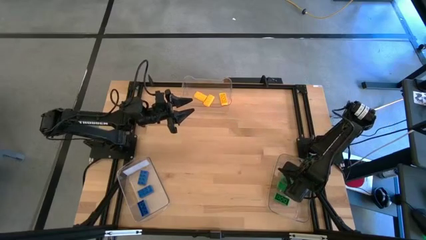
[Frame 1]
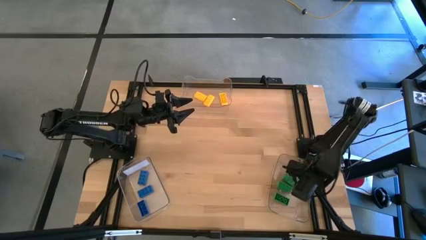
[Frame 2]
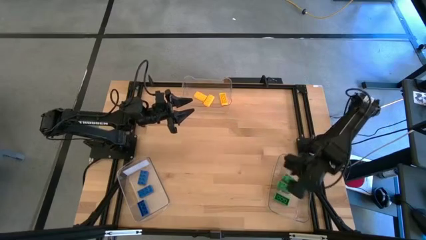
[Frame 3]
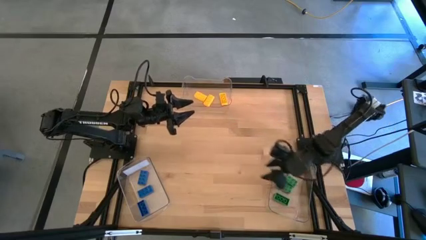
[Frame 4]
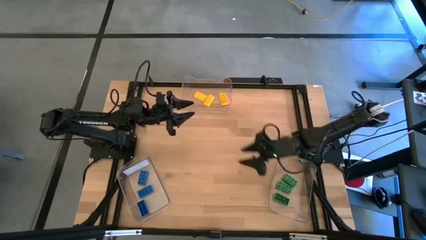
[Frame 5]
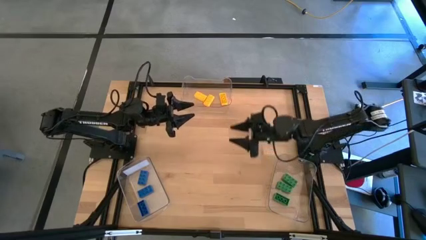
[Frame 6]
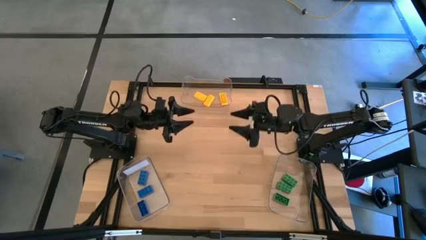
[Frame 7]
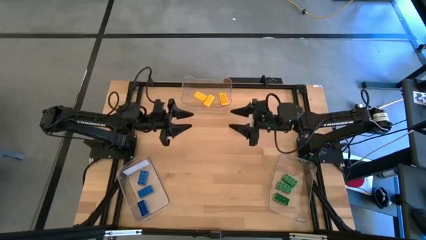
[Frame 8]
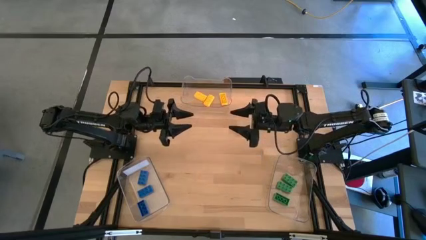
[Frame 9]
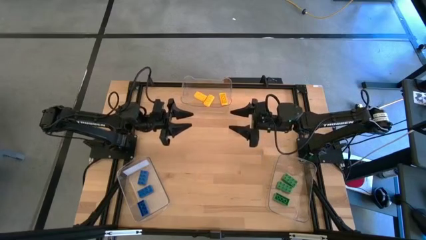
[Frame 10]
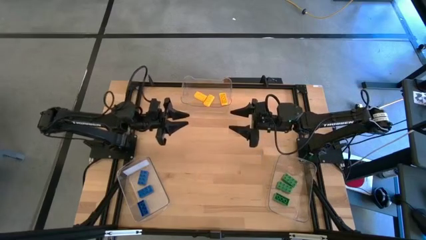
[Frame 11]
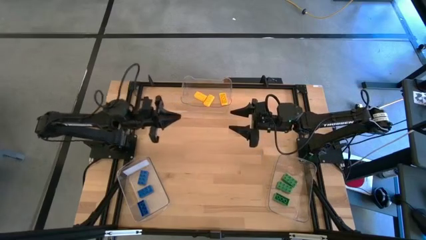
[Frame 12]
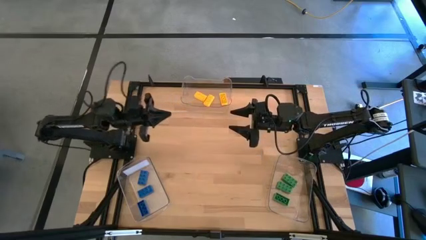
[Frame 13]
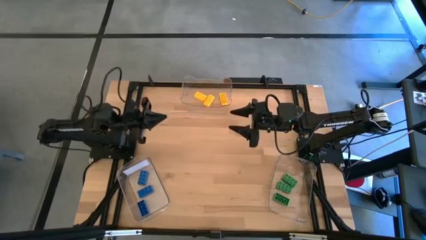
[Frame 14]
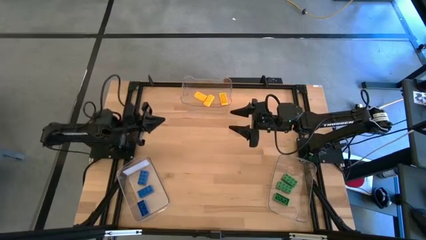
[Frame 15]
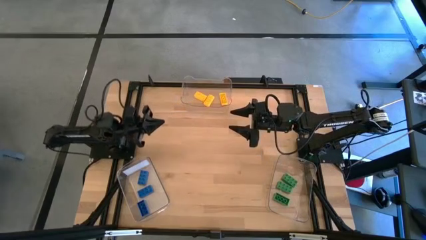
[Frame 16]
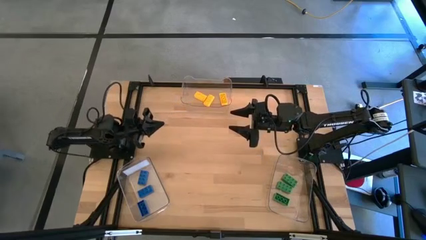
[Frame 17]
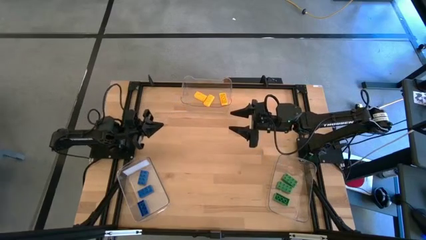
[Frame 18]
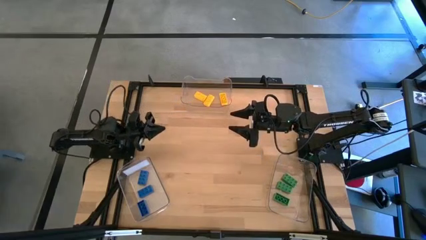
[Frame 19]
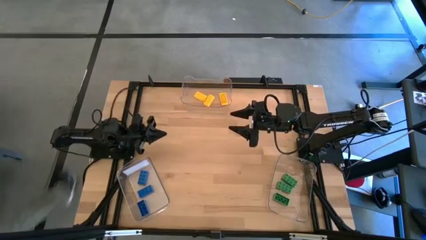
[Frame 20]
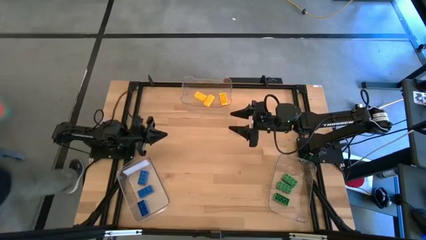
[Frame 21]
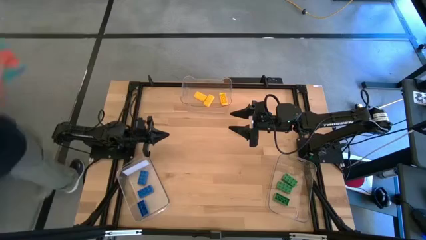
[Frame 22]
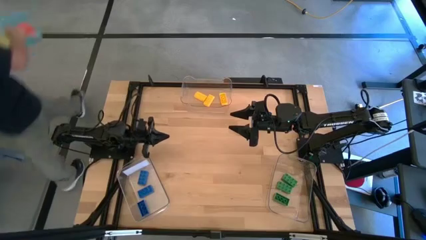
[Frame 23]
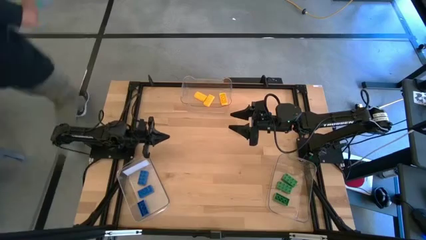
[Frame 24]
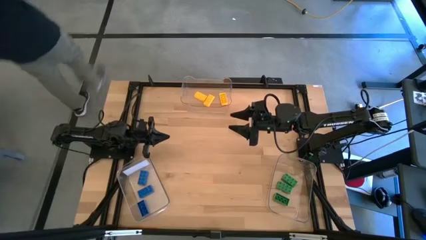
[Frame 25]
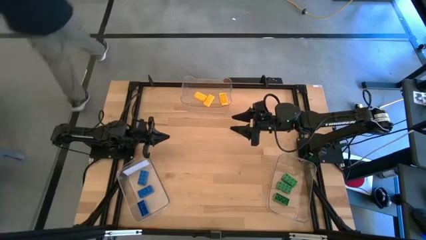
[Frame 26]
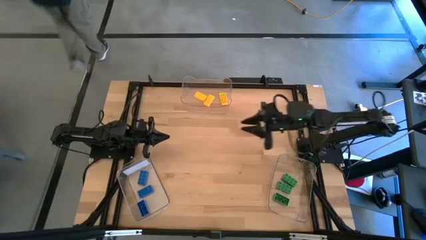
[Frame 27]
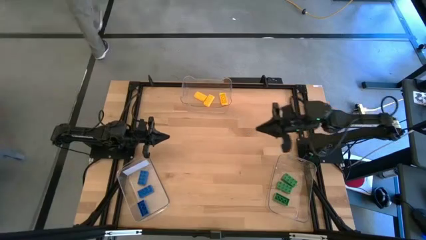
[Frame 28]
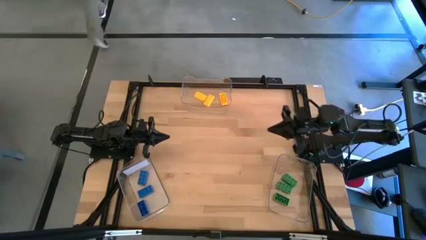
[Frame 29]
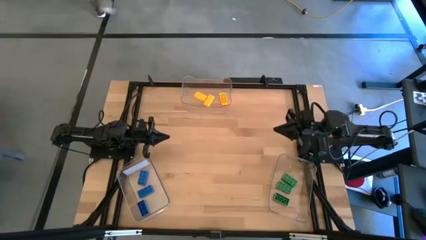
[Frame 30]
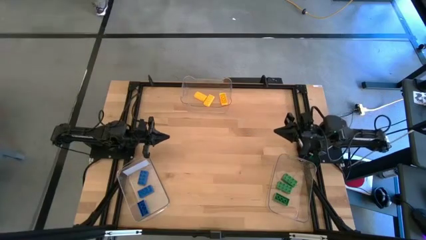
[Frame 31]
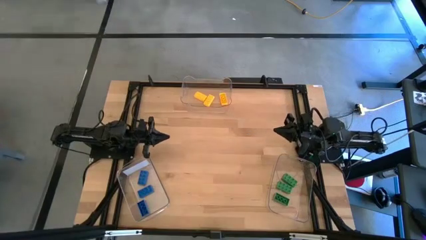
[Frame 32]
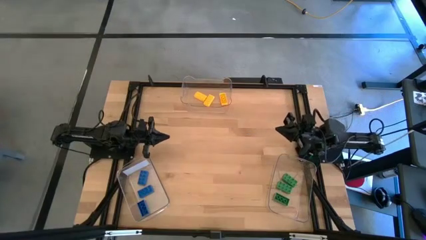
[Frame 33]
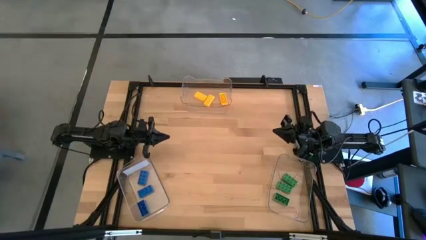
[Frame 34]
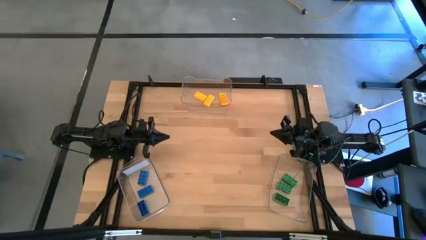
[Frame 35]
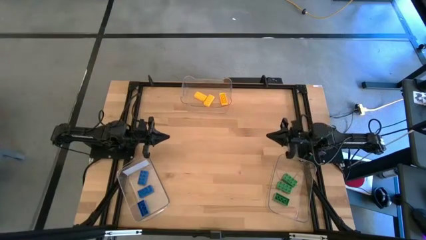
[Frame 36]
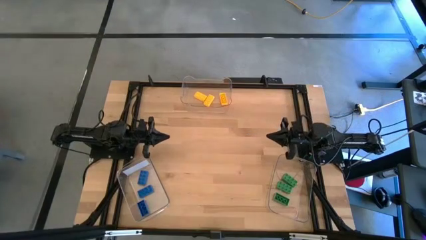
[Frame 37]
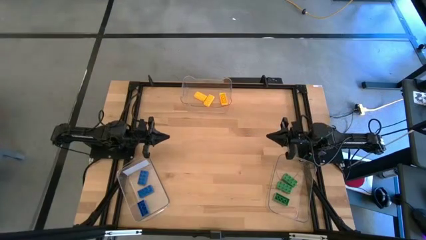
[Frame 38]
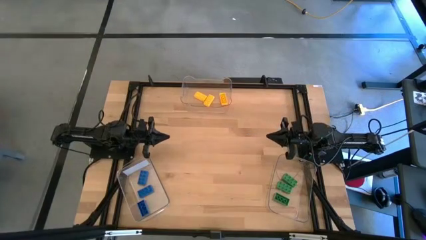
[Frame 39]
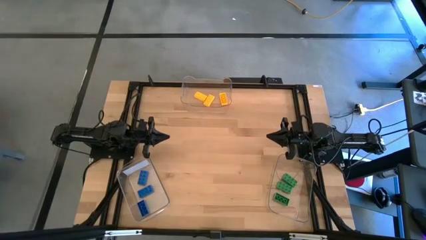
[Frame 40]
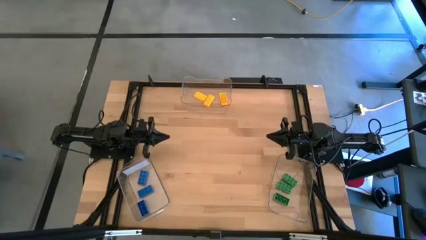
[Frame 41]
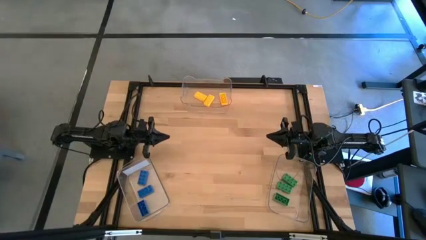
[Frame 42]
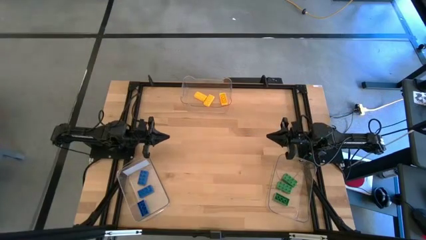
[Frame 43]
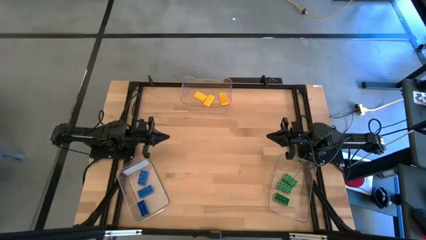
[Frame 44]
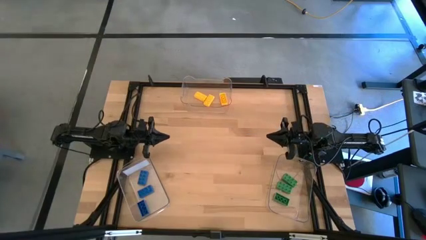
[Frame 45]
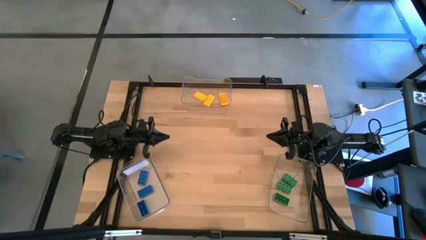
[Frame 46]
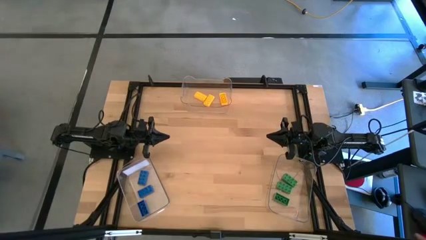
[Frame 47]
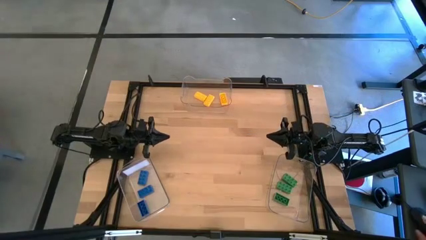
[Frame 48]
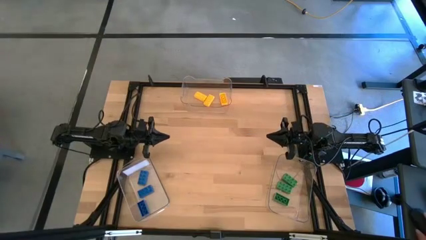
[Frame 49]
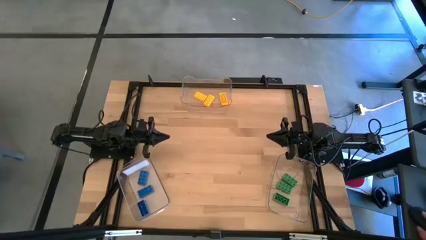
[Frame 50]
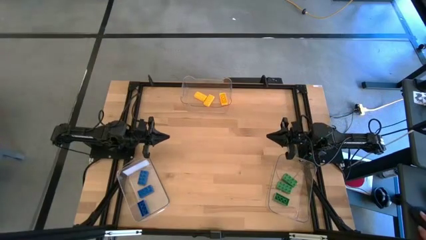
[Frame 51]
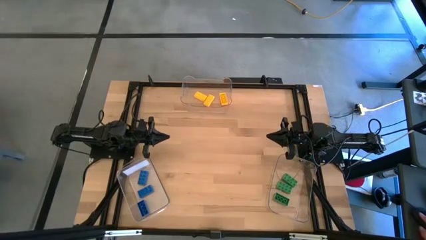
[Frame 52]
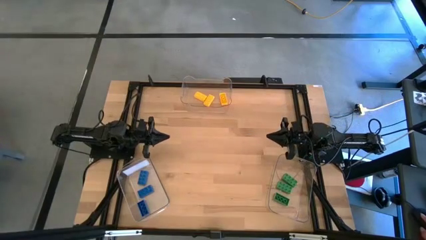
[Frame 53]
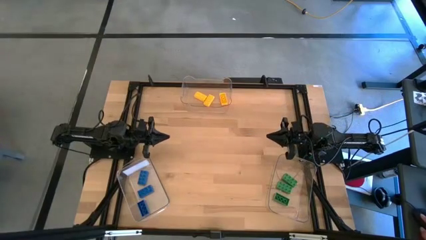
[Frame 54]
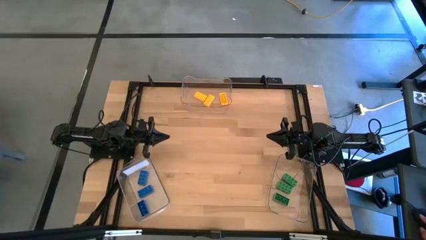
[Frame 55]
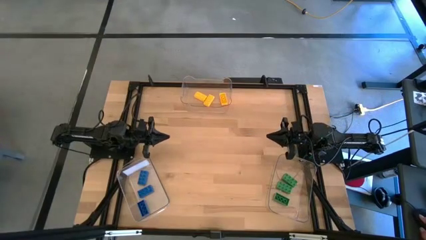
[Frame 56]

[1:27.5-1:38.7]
Task: Sort & place blocks by color
Return to Home Position

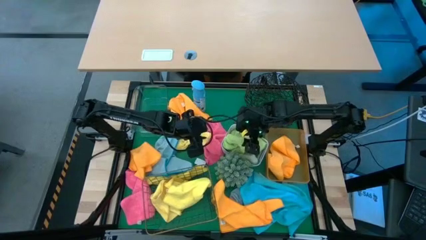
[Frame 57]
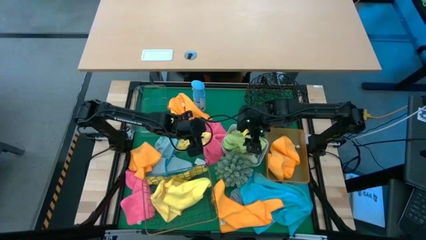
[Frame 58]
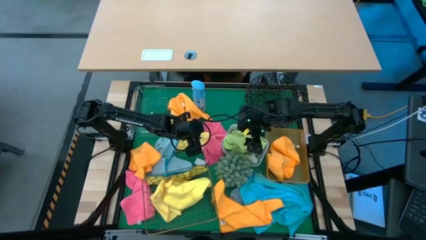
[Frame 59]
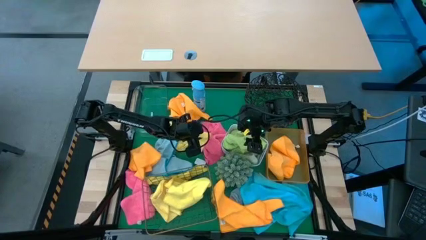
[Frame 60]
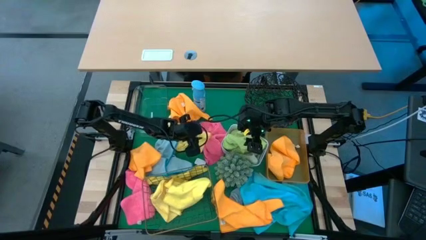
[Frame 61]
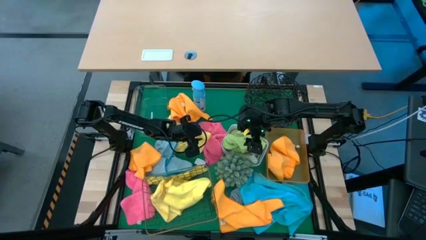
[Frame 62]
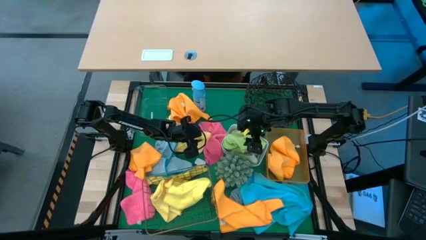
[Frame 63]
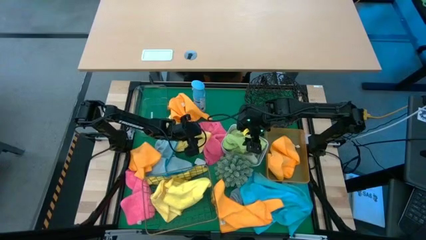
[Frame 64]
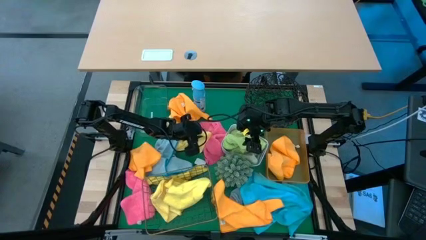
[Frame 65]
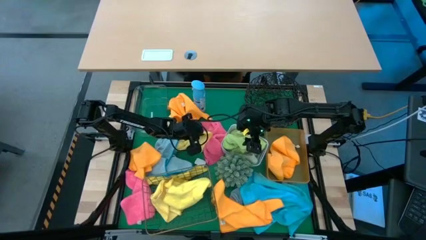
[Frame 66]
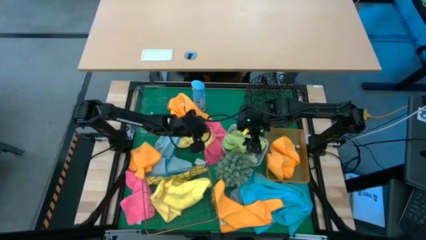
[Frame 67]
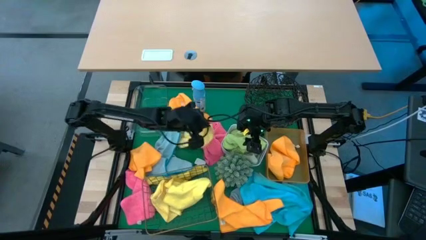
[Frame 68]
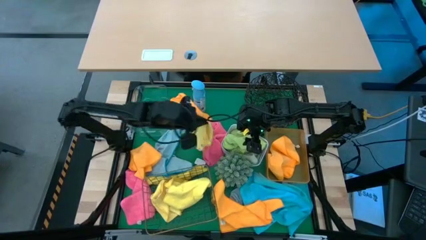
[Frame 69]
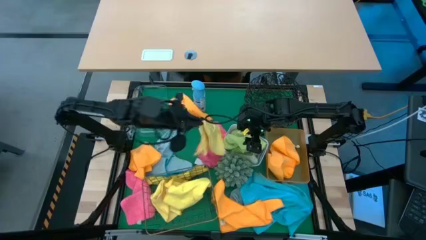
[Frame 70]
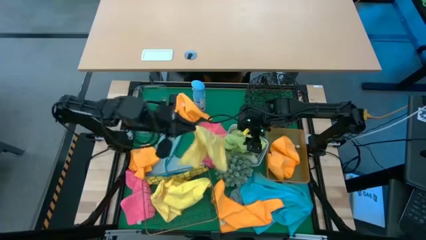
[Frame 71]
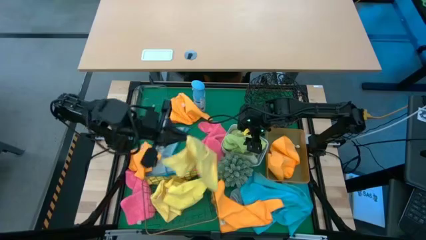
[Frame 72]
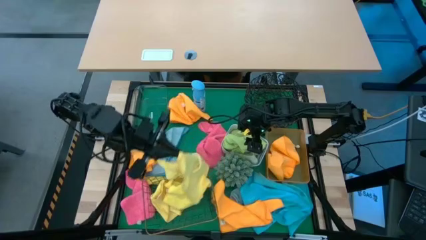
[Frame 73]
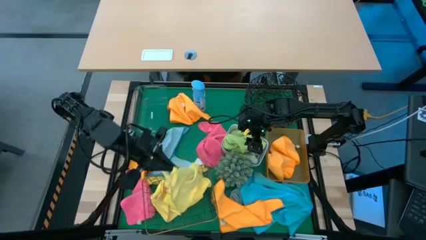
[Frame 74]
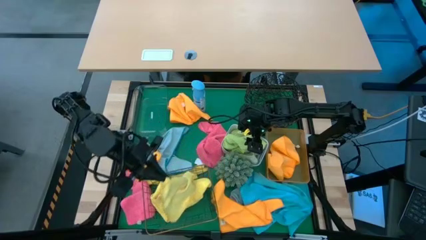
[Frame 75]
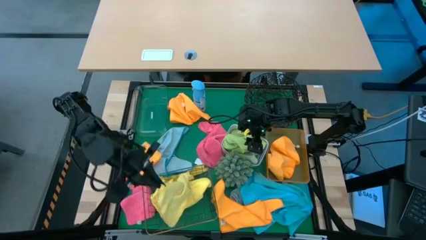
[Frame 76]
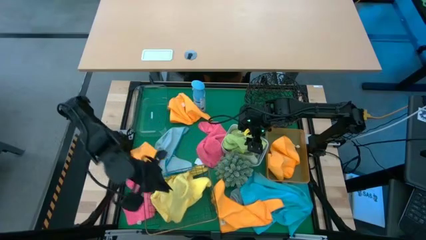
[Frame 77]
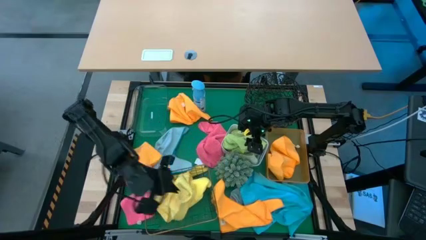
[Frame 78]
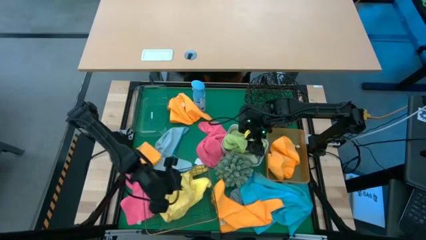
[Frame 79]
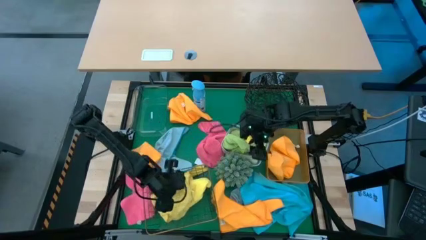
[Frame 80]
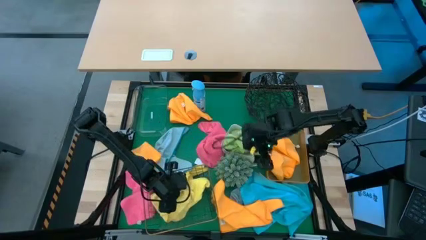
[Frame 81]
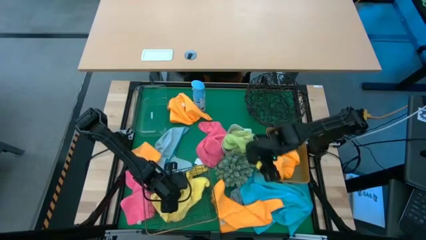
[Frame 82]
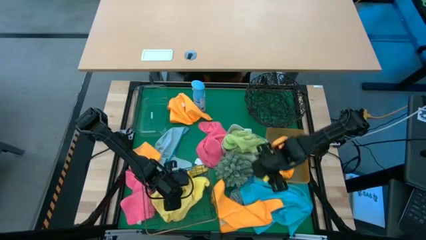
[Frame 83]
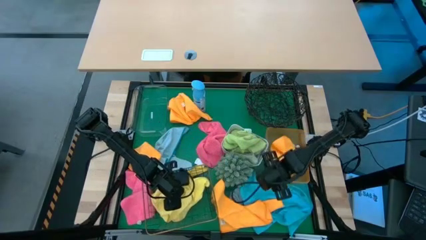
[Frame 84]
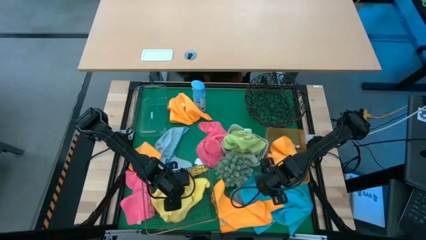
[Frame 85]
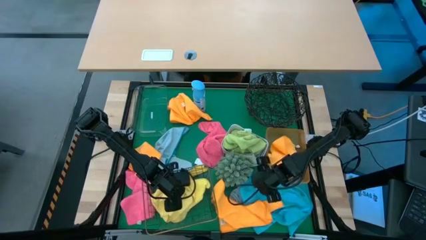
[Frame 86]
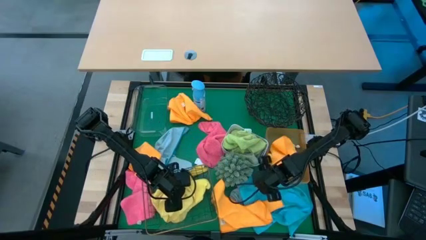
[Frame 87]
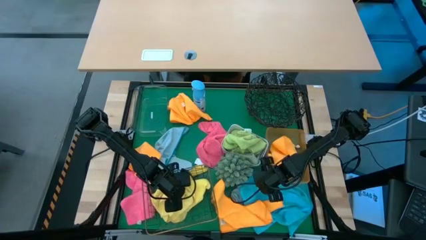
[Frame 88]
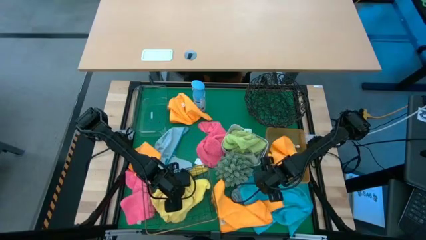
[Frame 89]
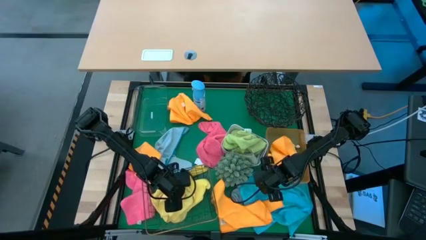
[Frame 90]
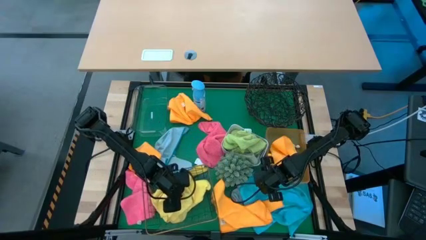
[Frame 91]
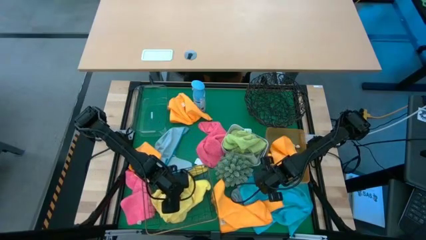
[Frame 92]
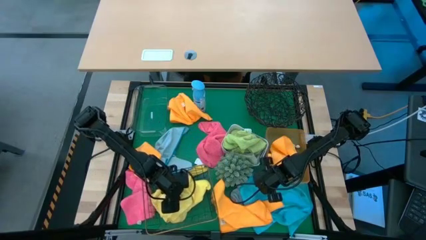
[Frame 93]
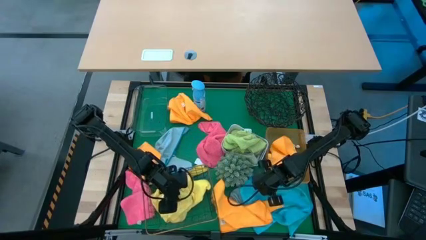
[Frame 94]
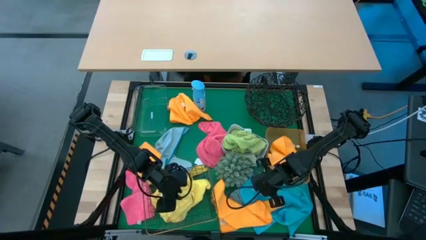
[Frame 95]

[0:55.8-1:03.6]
Task: Sort microfiber towel by color & place in baskets
Put the yellow microfiber cloth into the gold wire basket
